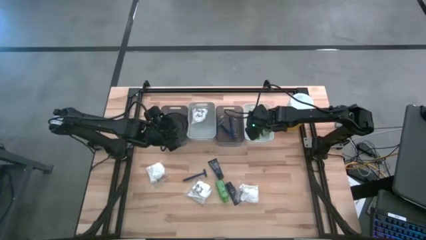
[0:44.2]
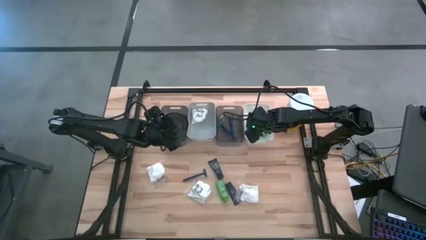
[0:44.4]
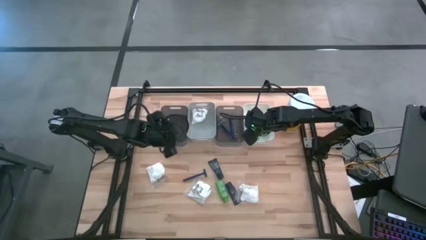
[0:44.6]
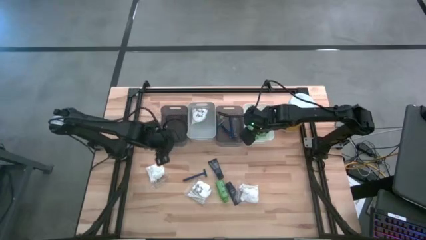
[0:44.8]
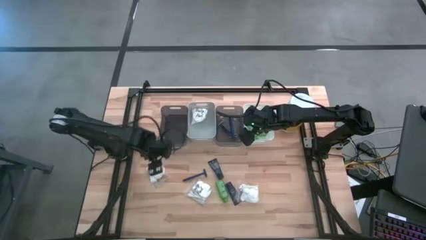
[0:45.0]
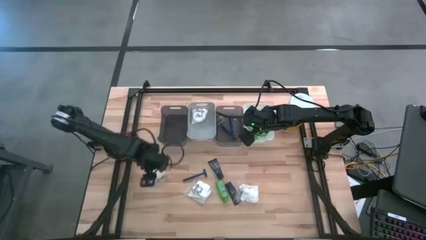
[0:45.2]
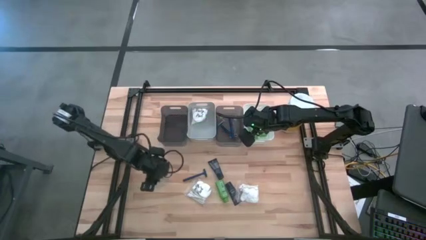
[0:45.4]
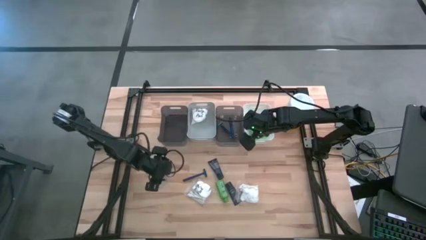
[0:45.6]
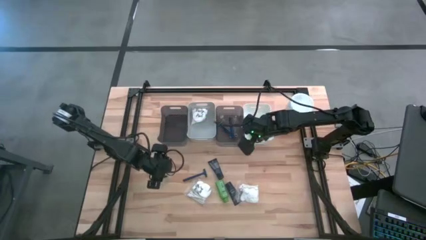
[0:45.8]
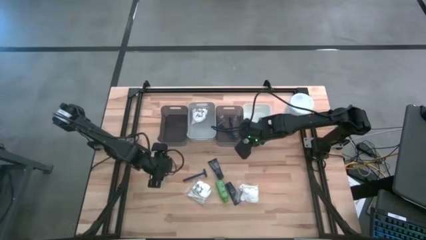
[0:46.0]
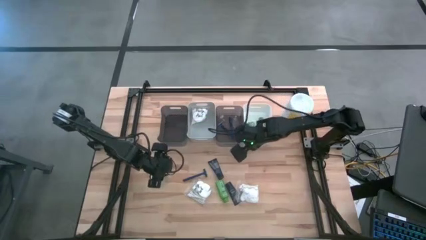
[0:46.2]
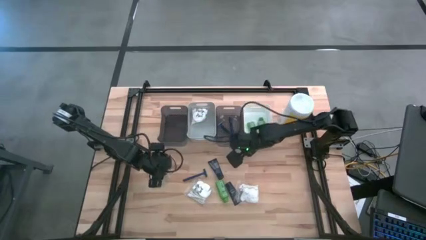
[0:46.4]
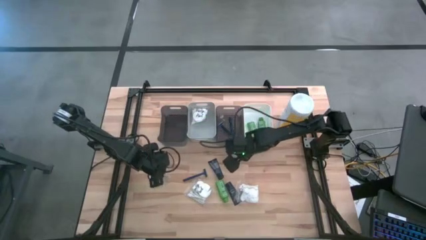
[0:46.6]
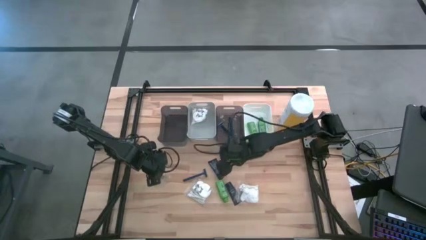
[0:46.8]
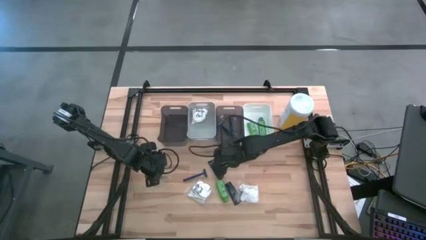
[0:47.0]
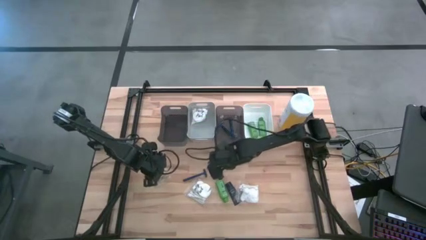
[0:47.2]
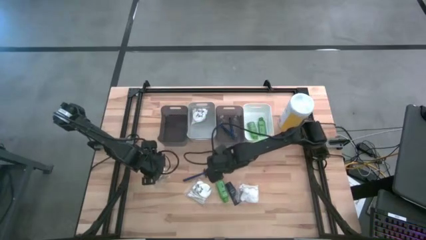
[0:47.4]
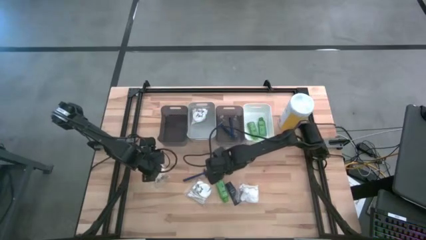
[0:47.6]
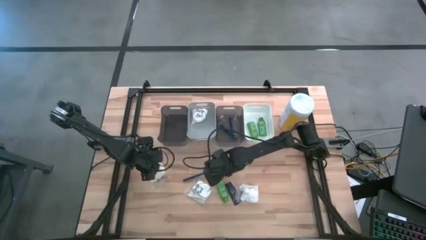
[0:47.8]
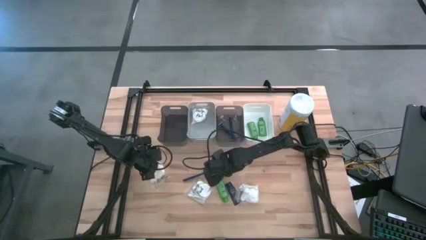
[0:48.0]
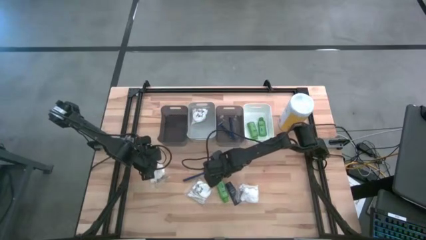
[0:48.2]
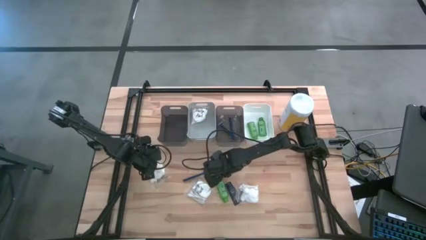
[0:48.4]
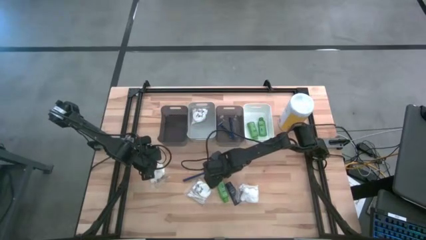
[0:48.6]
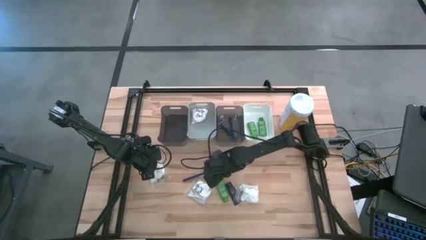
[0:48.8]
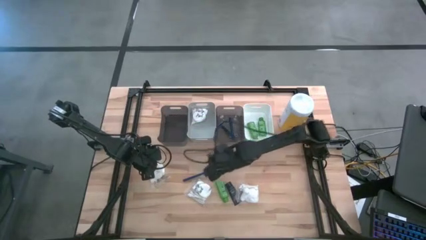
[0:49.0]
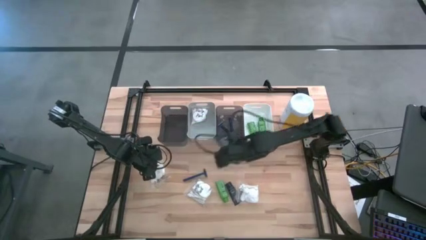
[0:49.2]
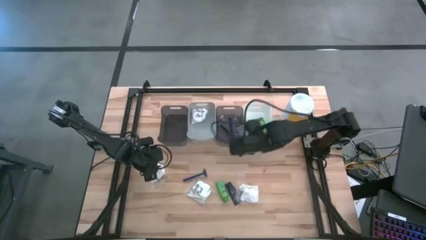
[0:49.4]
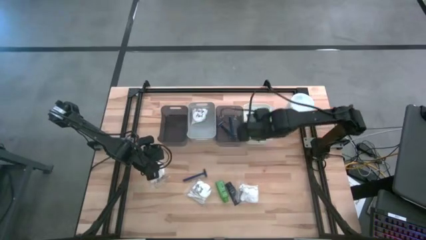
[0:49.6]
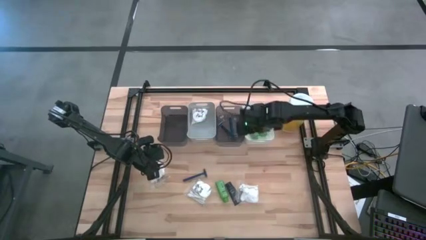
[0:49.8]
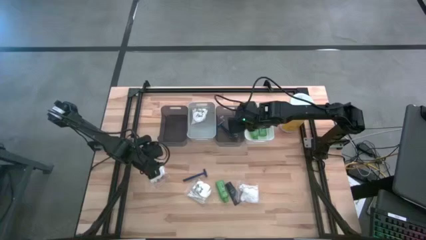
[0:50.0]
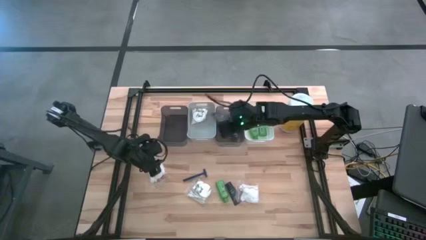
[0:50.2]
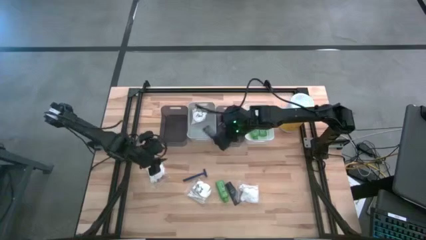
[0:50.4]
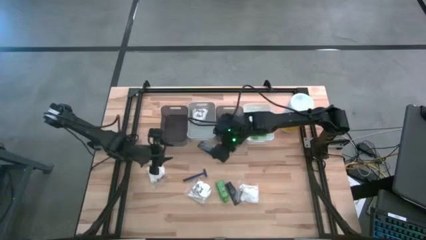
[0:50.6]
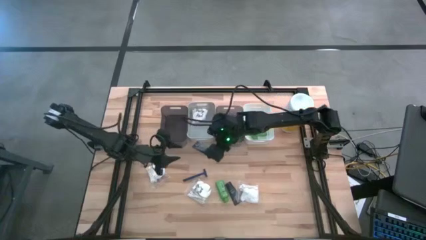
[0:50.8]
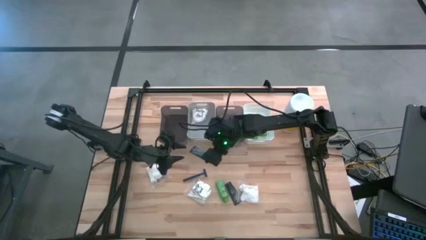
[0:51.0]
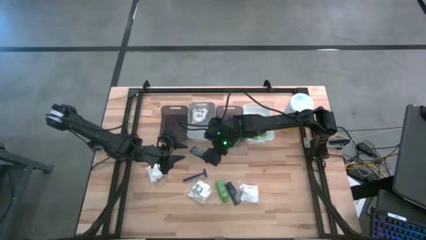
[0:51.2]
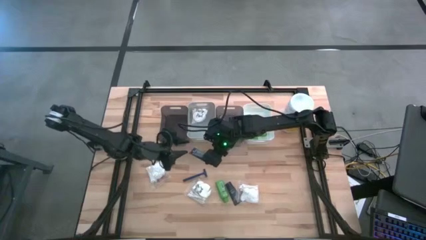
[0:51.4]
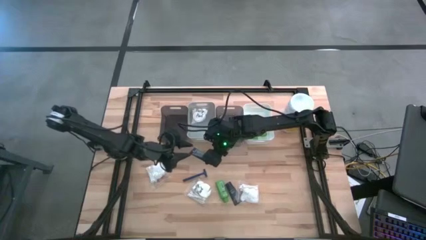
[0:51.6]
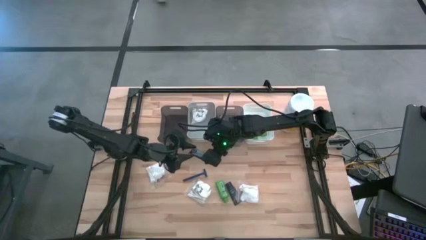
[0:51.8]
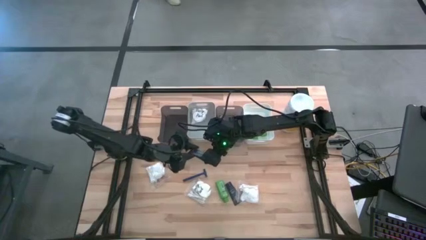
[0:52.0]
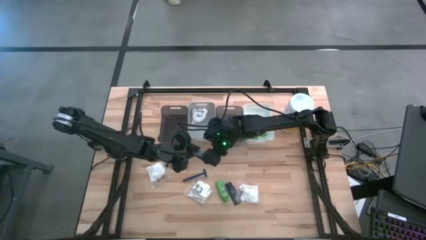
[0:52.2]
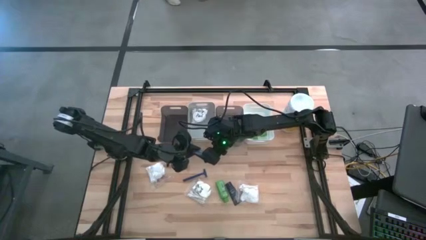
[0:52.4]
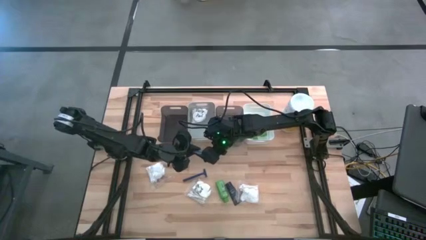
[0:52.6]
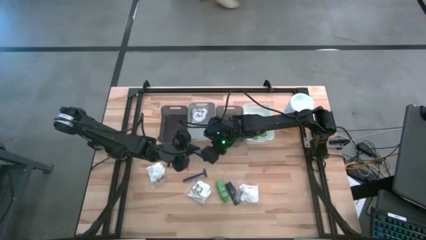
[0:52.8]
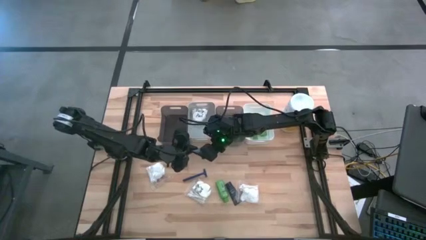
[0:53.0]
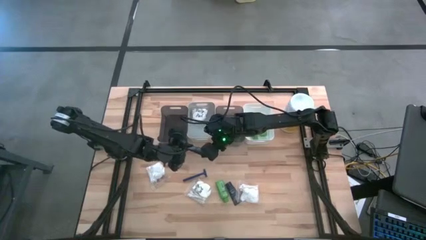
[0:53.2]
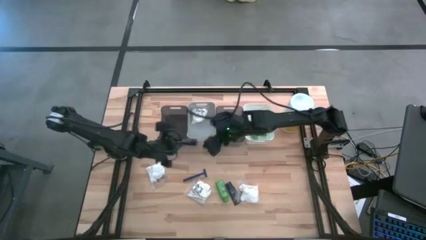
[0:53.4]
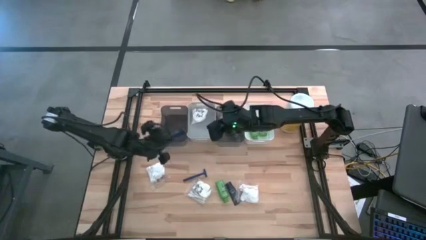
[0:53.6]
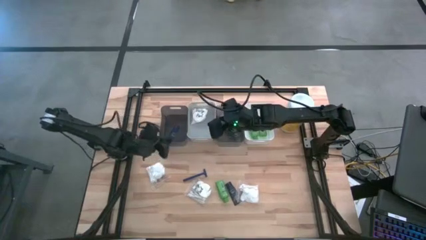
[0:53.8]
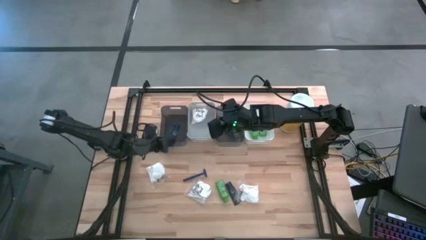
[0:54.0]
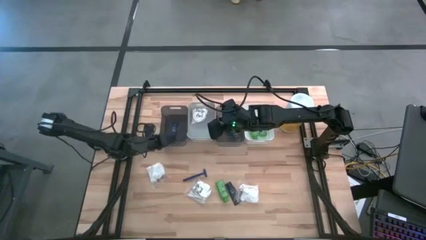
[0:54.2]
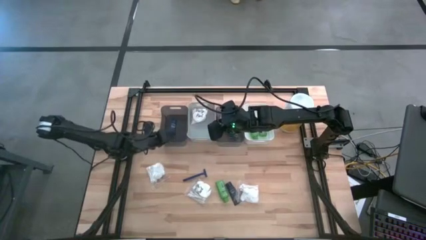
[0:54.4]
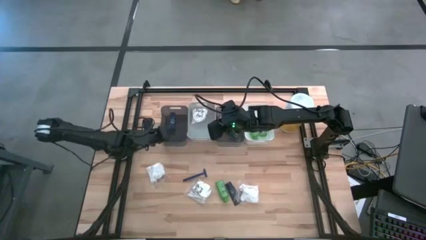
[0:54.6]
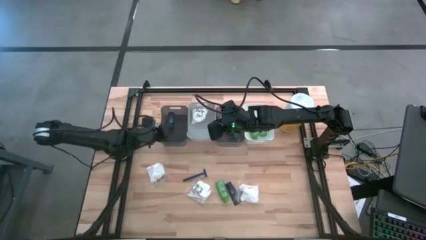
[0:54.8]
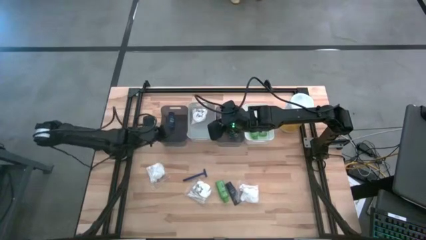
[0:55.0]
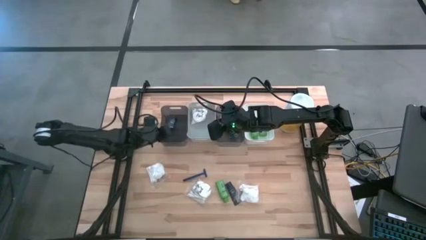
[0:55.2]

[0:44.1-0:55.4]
Task: Pick & Place Travel size toiletries
Put the blue shave cream into the left black bin
